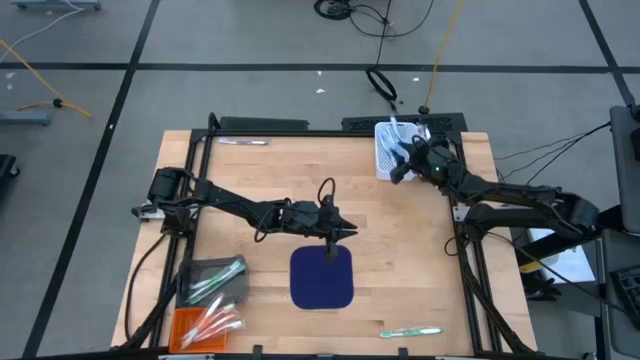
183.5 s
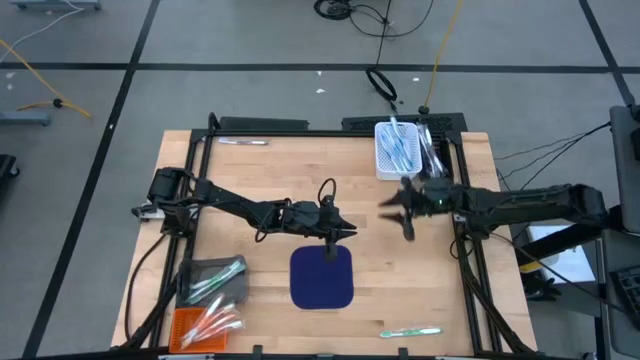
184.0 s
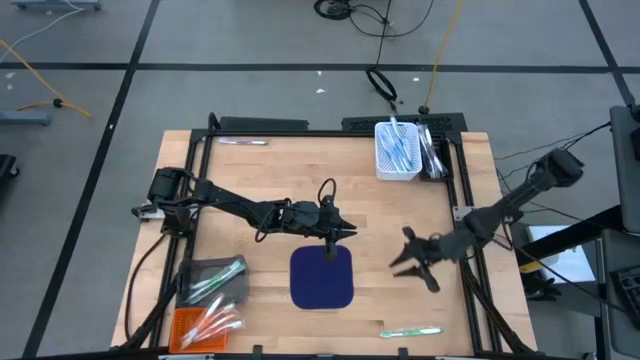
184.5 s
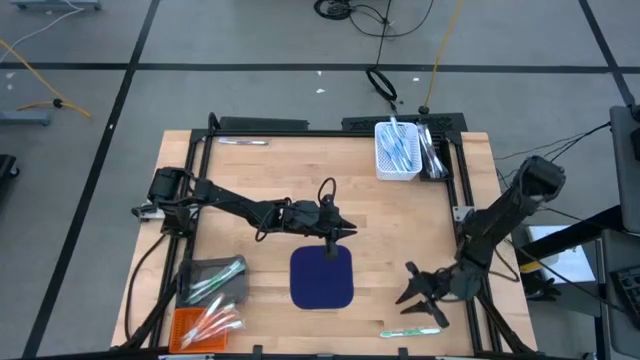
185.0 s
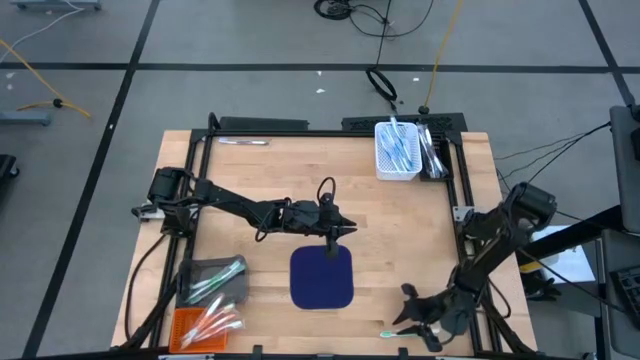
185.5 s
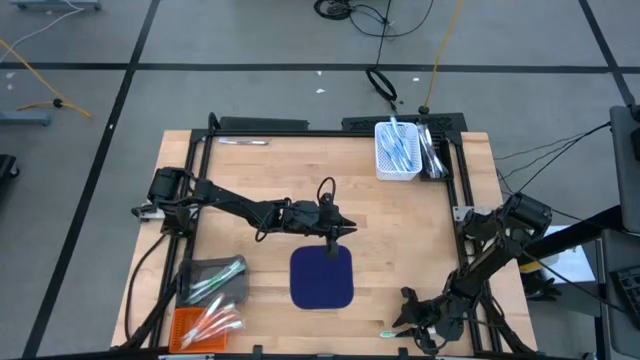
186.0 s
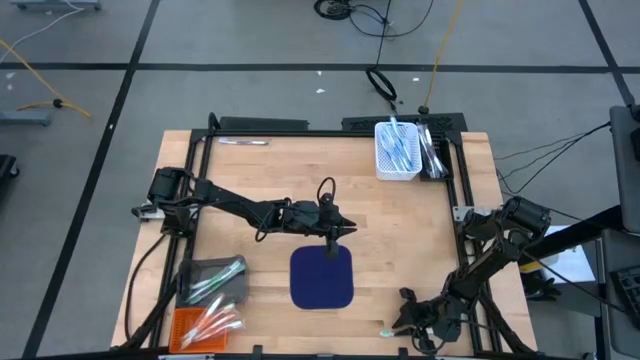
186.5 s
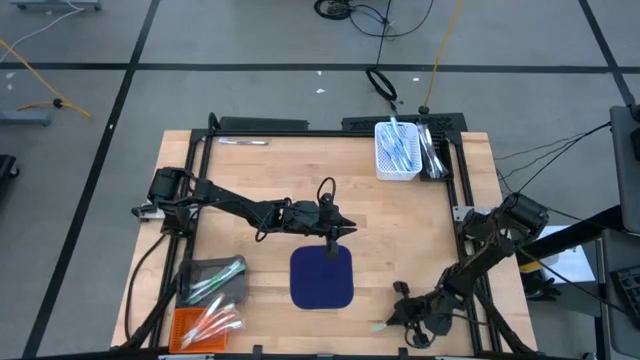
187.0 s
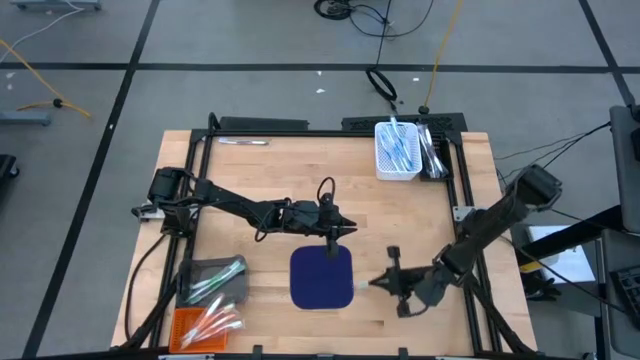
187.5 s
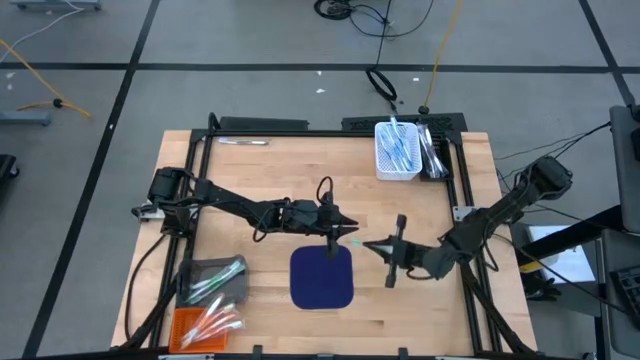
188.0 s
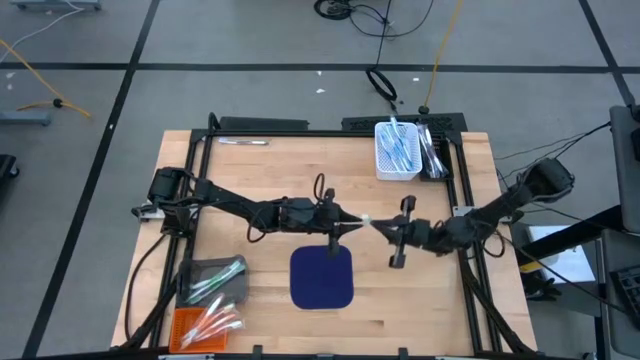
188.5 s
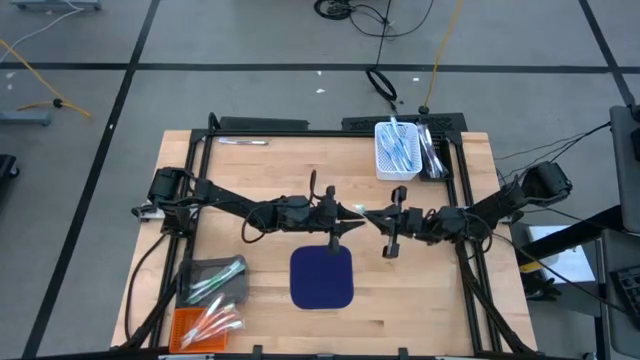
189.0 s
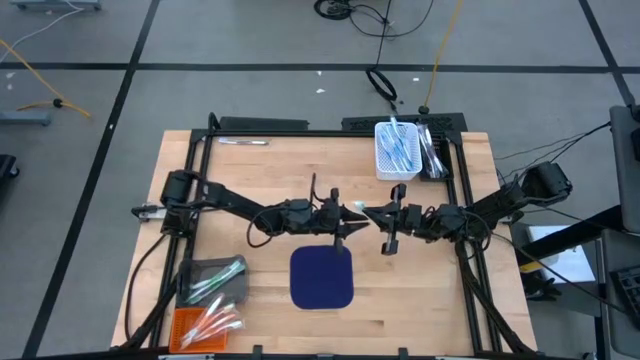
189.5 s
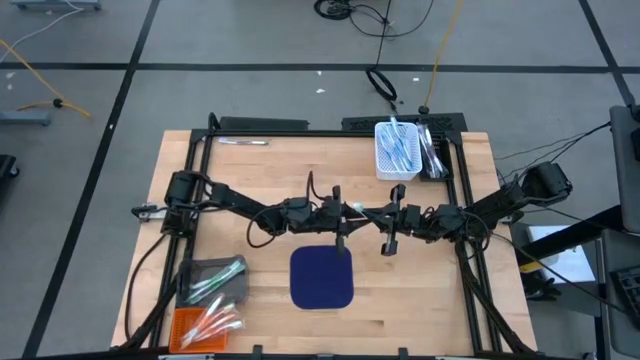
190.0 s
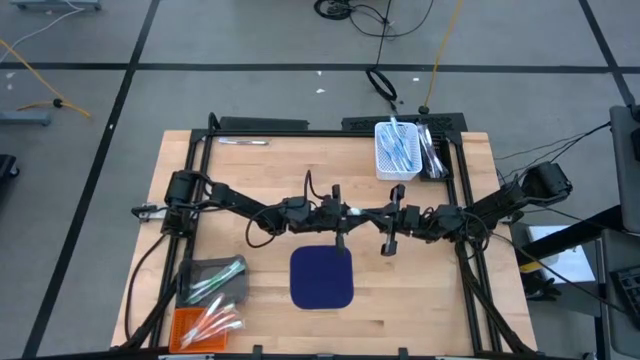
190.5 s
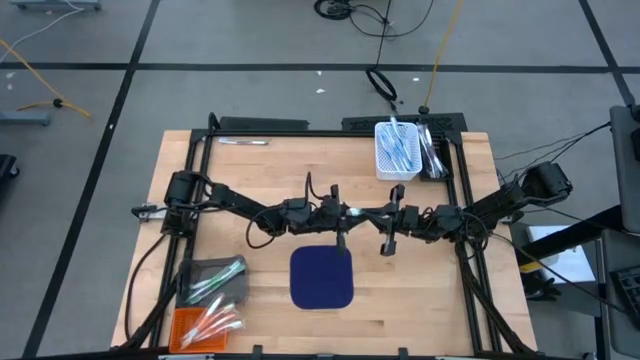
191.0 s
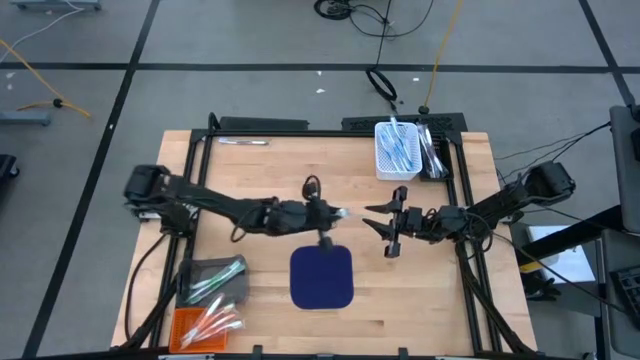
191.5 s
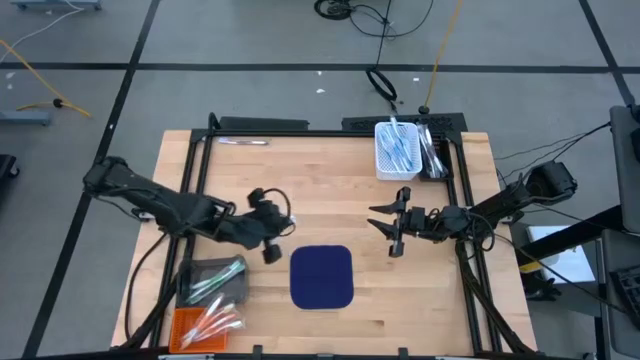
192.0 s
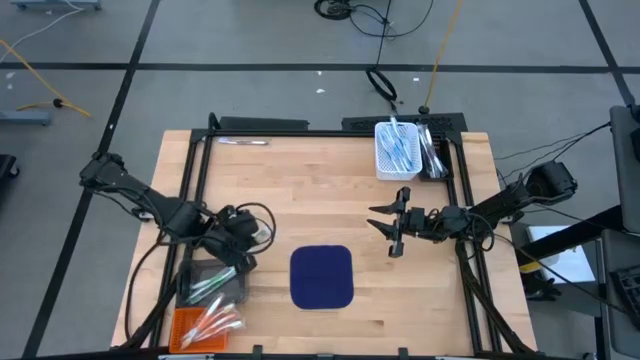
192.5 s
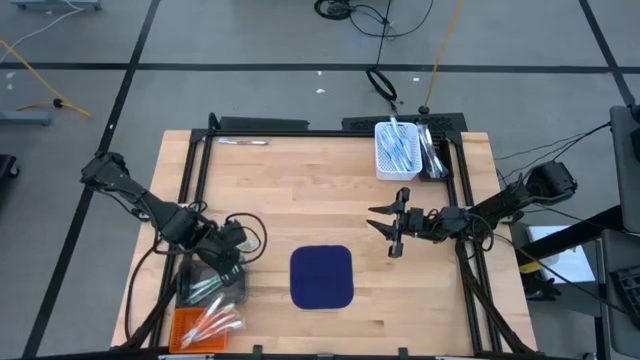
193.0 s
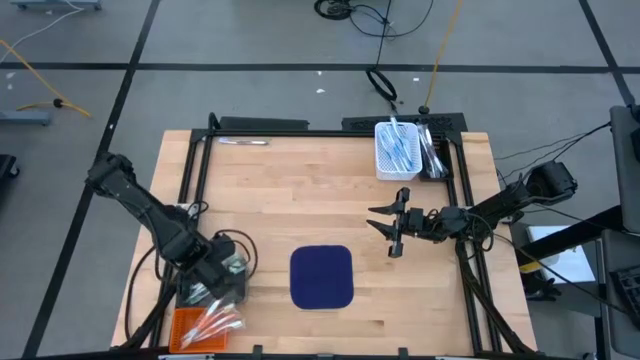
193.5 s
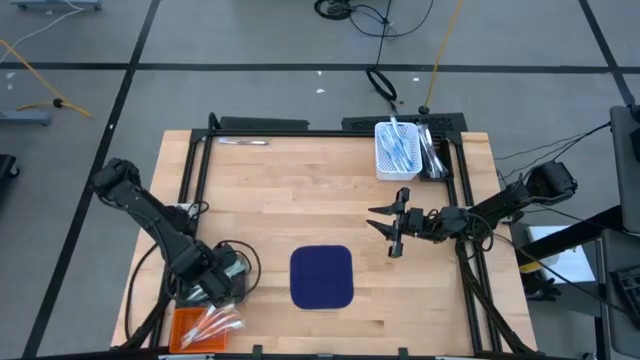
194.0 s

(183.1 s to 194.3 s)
Task: Pick & Place Toothbrushes
Put the green toothbrush into the black bin

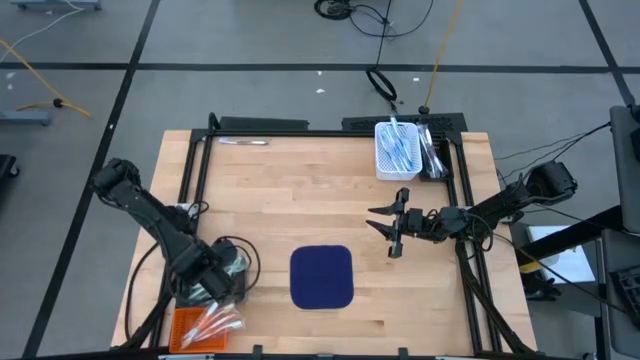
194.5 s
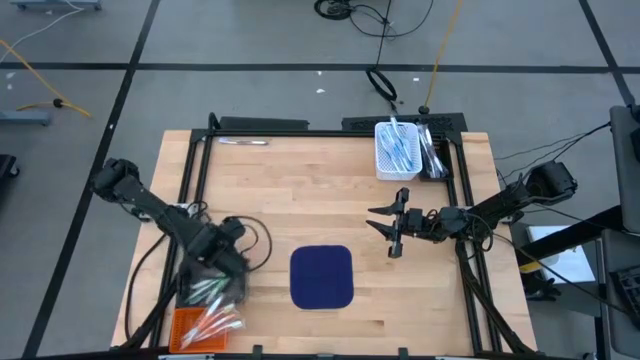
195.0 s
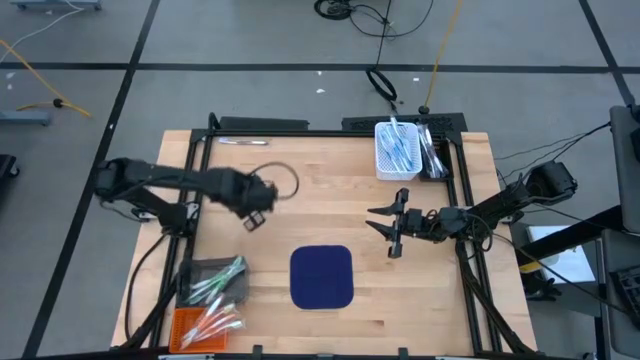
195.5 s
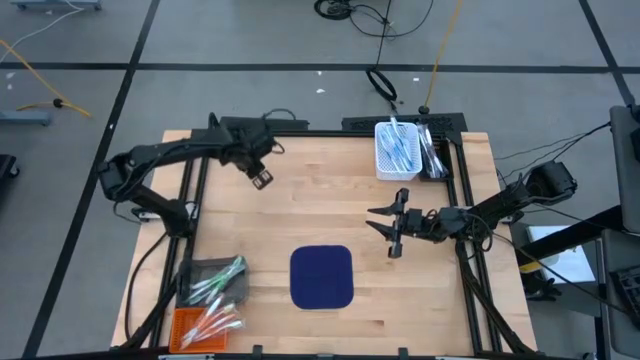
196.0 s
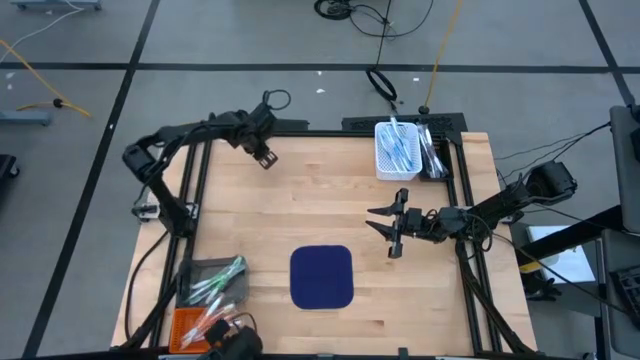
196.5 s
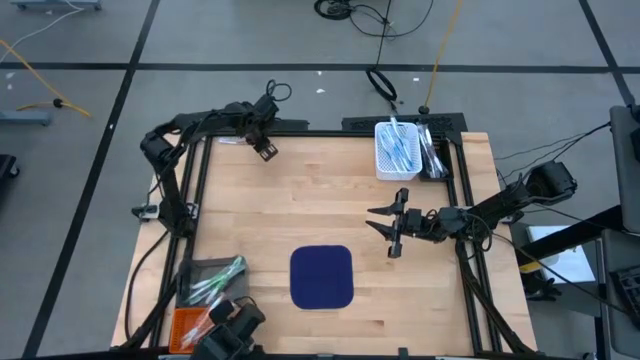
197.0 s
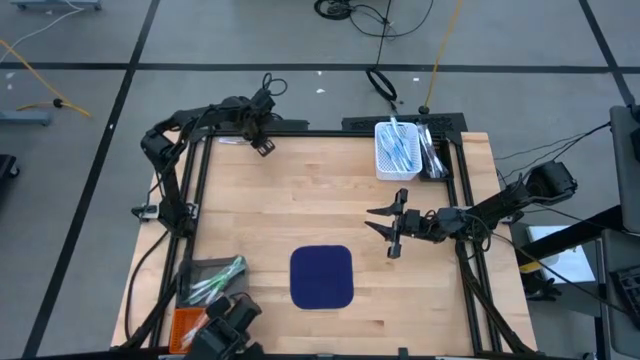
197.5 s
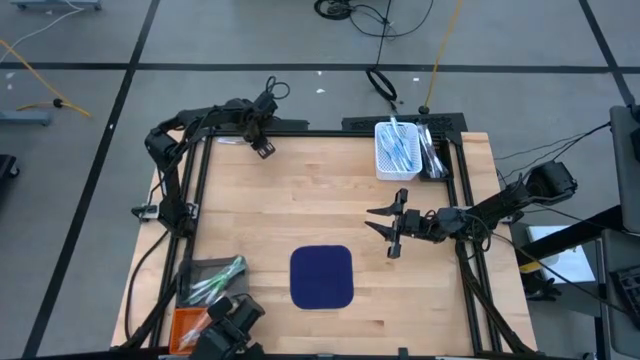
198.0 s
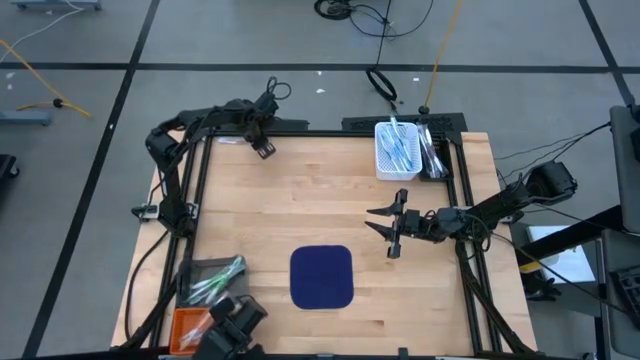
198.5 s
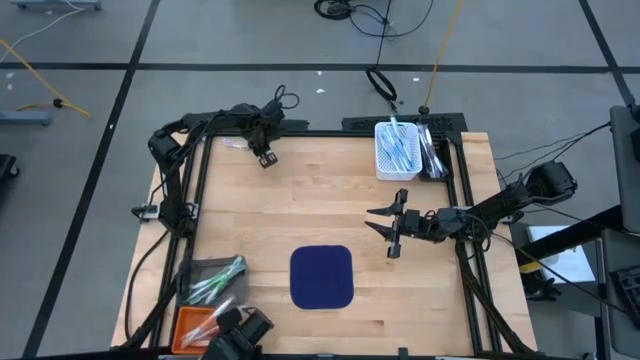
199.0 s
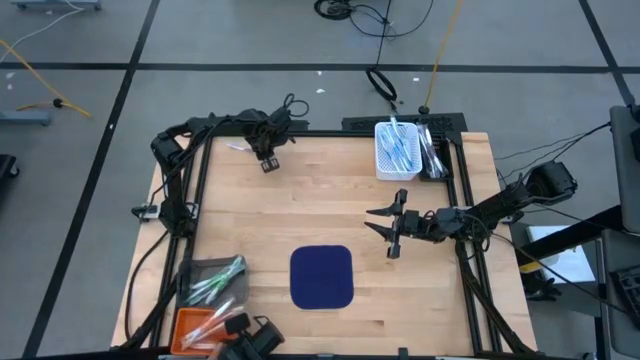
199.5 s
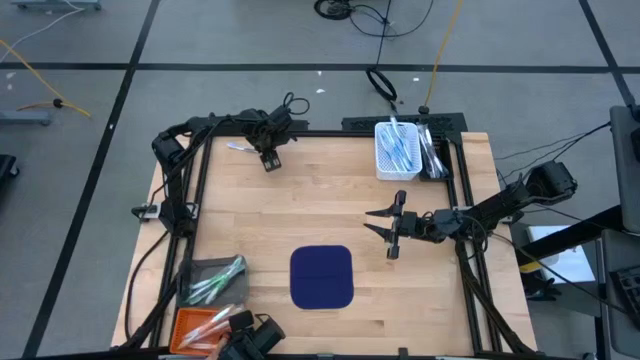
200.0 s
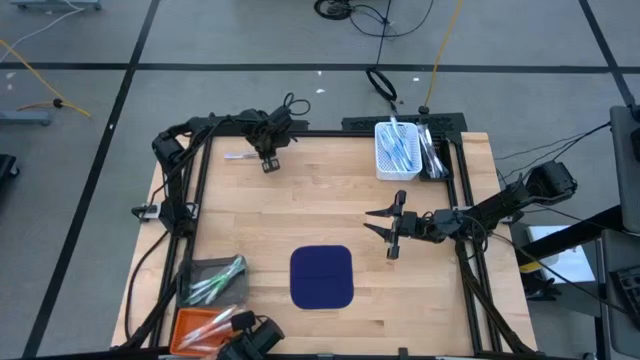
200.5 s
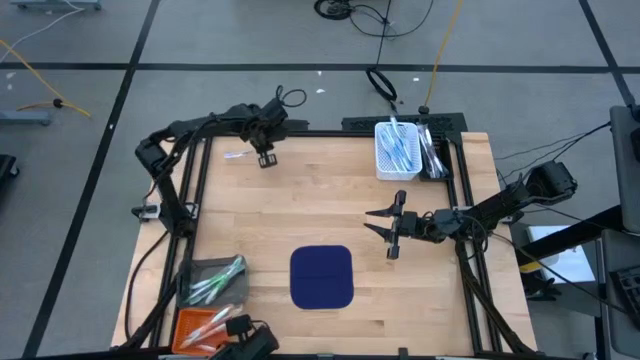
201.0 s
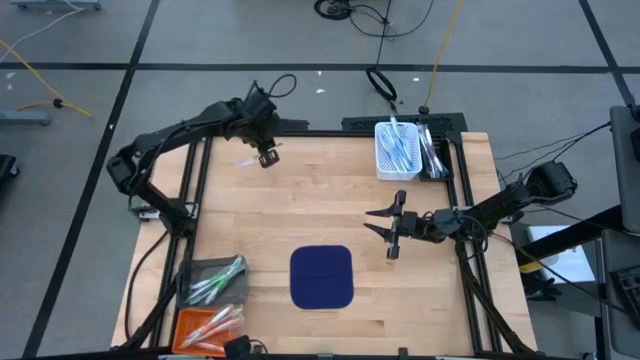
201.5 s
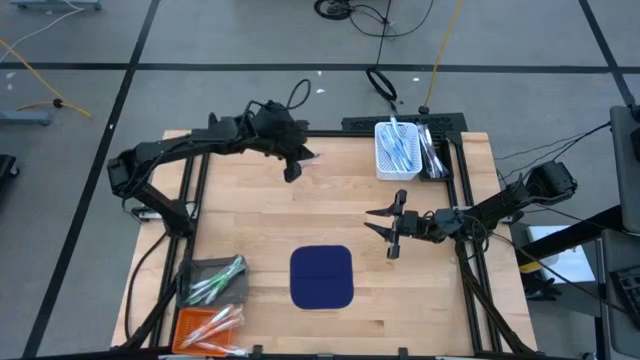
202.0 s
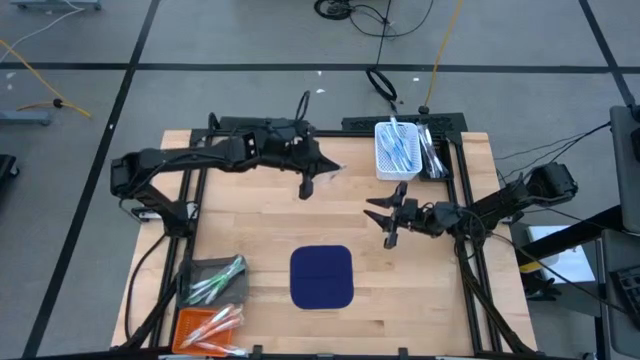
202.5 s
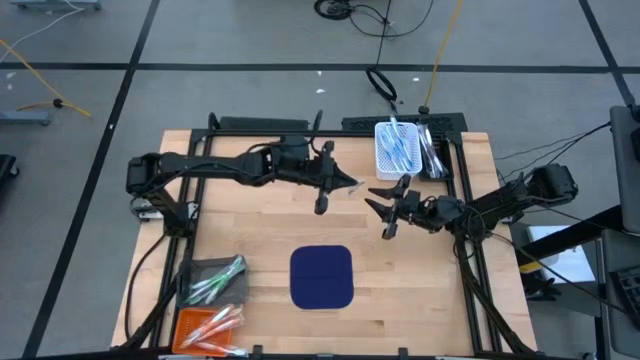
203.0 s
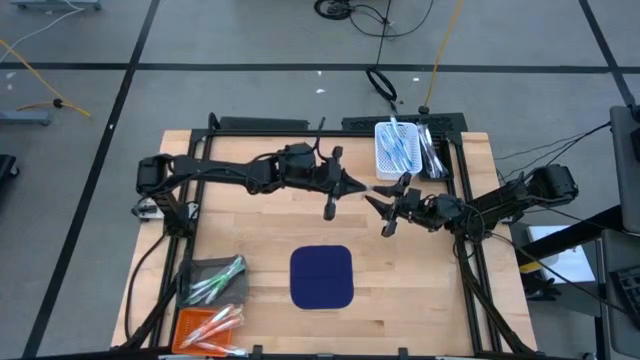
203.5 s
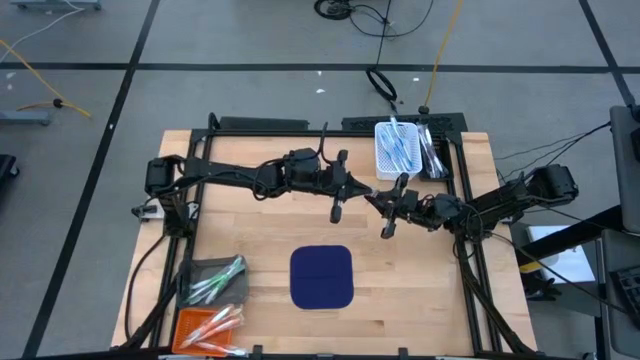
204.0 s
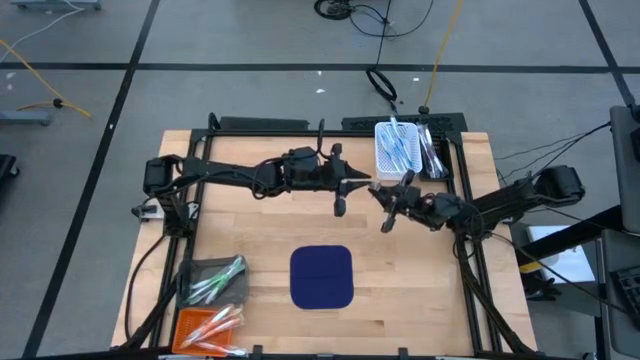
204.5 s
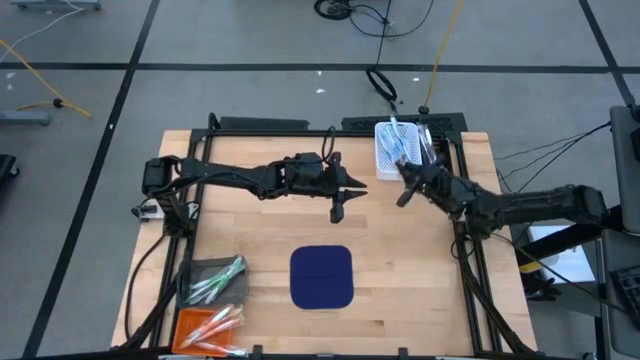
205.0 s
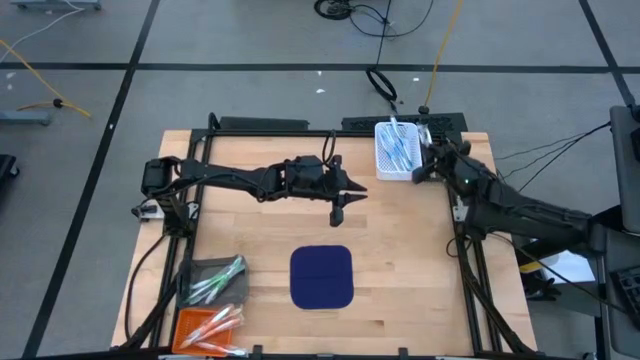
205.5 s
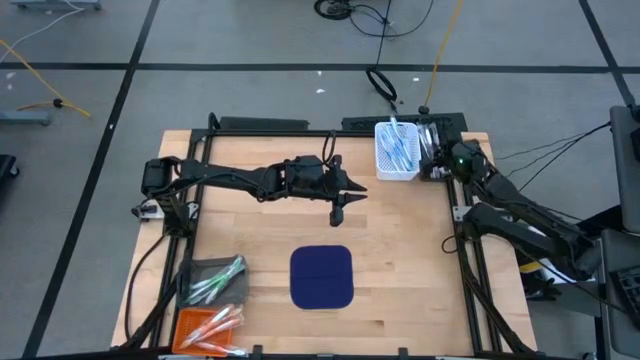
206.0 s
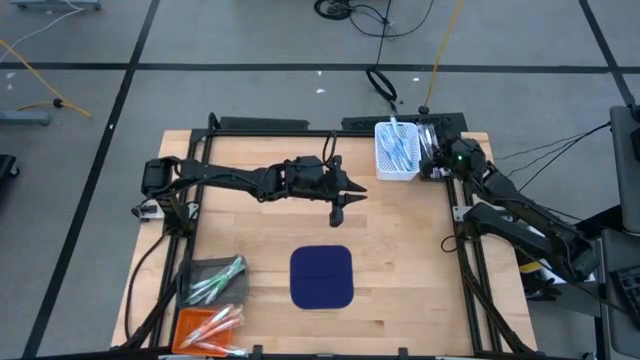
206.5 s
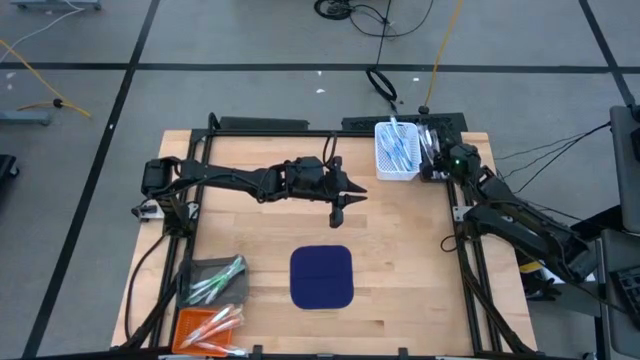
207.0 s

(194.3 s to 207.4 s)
Put the violet toothbrush into the black basket
